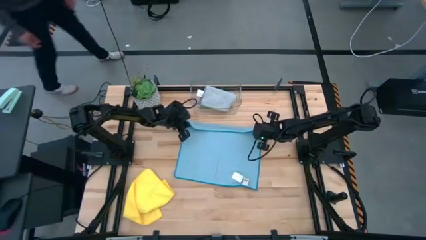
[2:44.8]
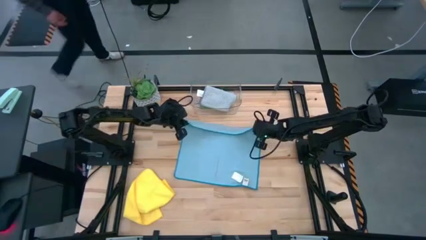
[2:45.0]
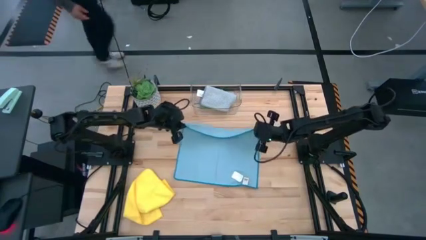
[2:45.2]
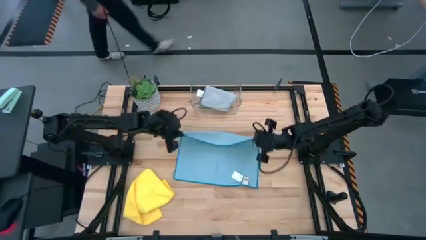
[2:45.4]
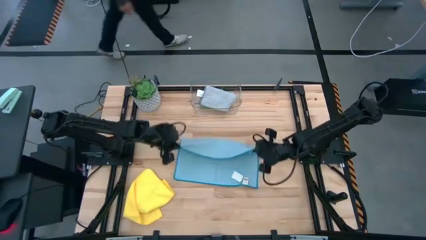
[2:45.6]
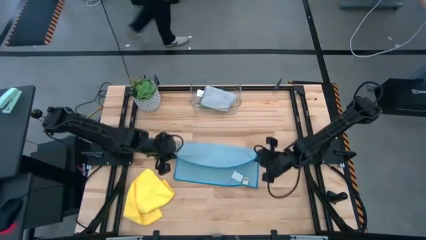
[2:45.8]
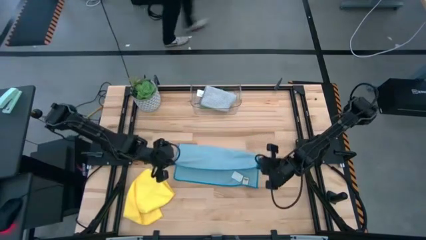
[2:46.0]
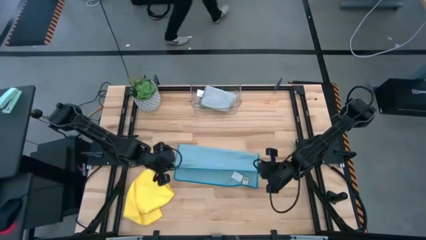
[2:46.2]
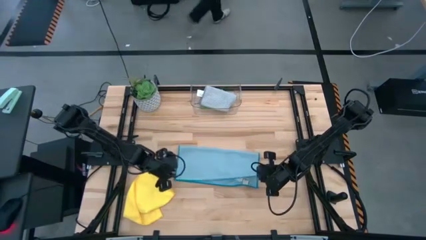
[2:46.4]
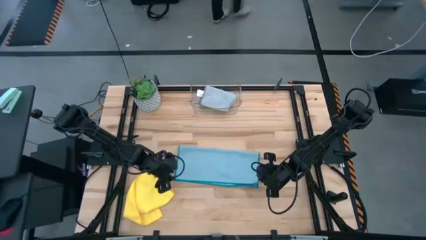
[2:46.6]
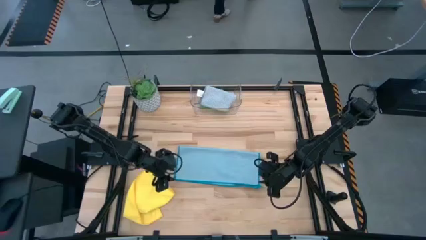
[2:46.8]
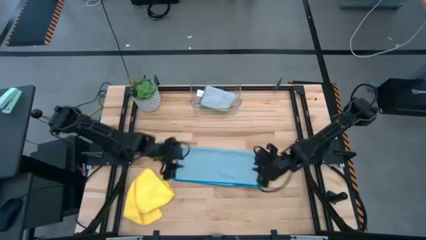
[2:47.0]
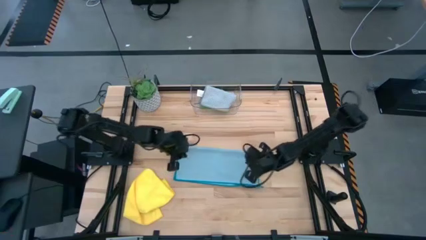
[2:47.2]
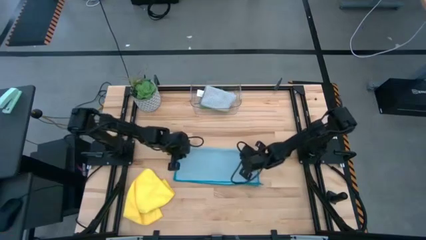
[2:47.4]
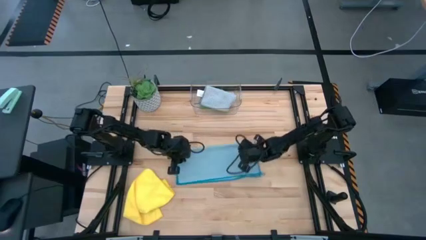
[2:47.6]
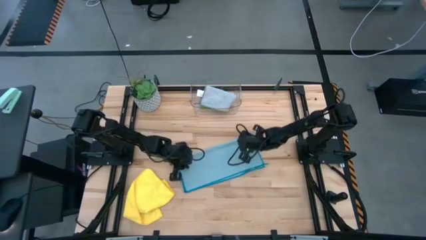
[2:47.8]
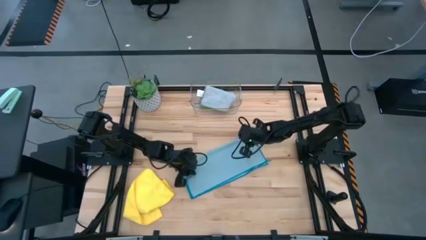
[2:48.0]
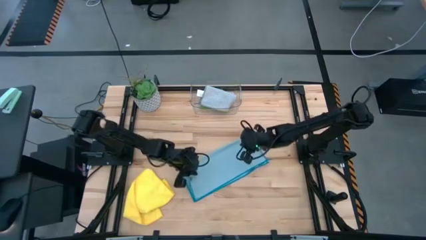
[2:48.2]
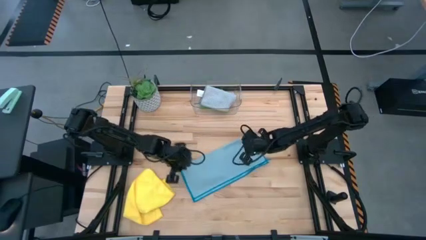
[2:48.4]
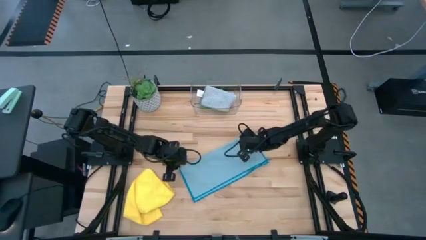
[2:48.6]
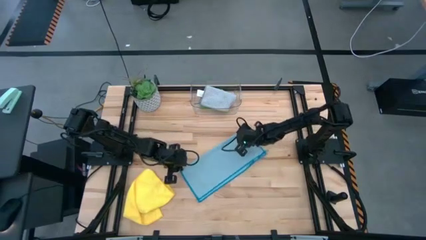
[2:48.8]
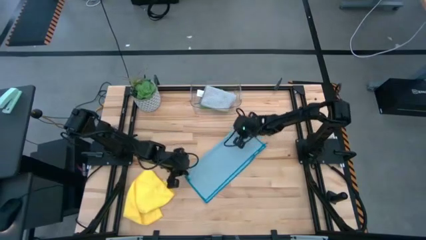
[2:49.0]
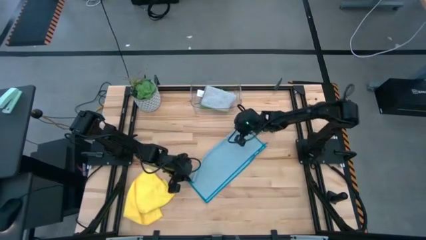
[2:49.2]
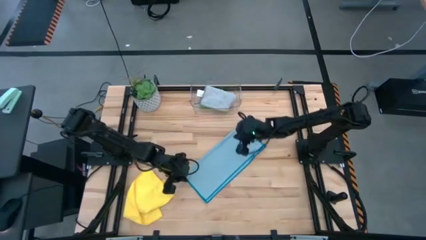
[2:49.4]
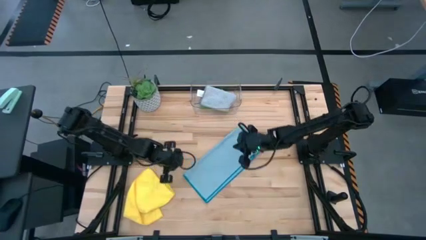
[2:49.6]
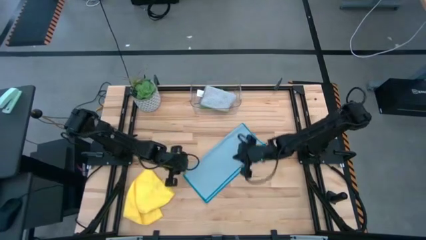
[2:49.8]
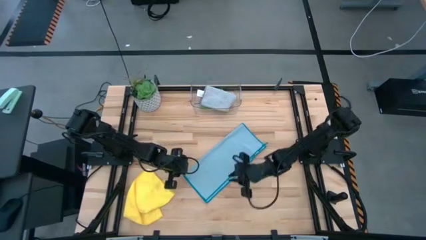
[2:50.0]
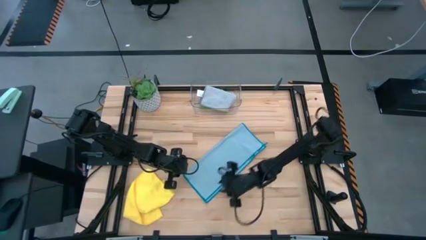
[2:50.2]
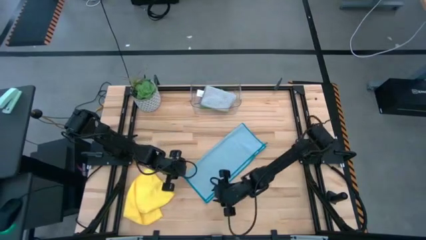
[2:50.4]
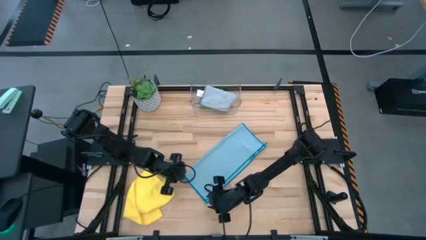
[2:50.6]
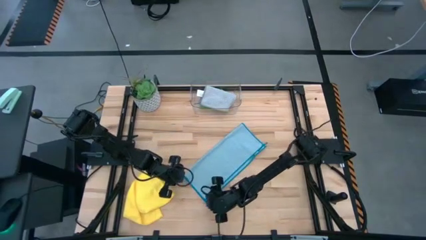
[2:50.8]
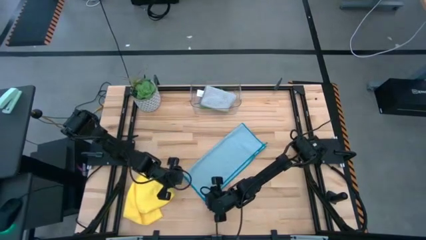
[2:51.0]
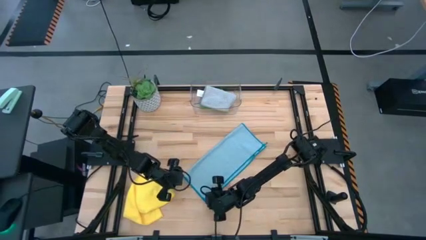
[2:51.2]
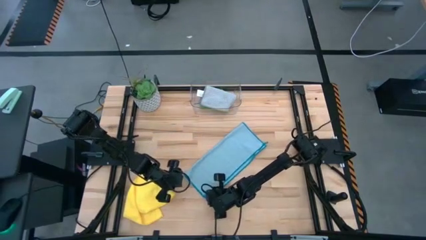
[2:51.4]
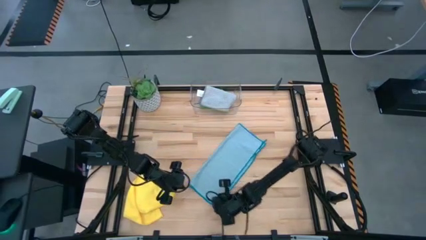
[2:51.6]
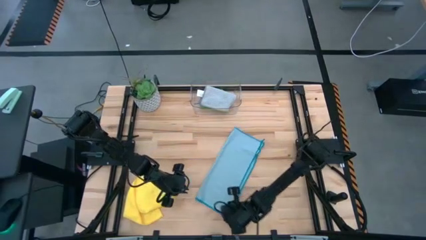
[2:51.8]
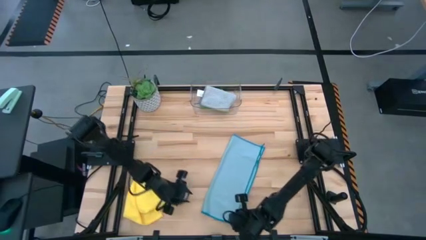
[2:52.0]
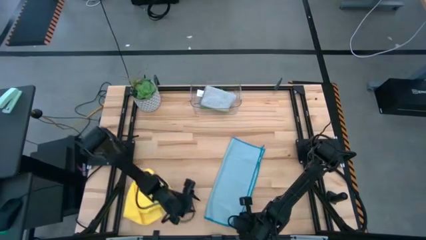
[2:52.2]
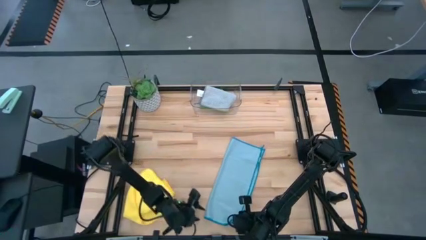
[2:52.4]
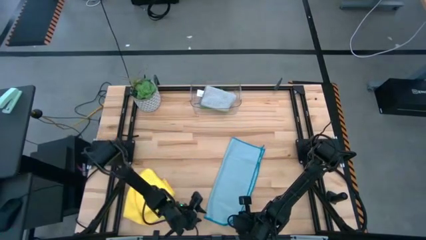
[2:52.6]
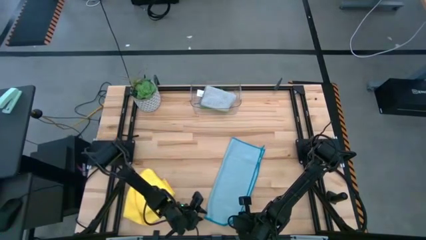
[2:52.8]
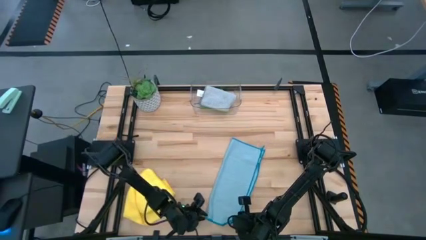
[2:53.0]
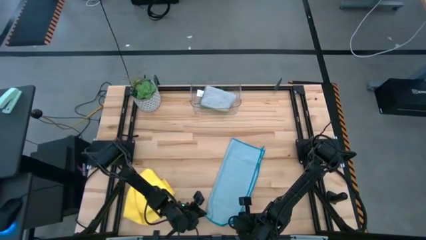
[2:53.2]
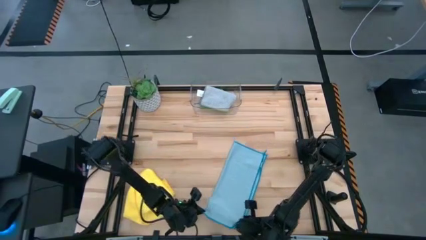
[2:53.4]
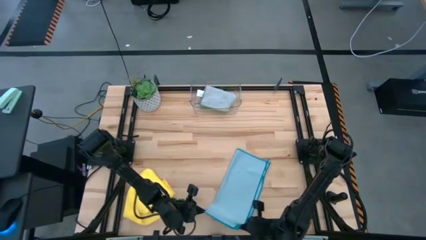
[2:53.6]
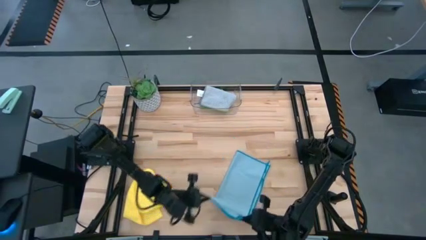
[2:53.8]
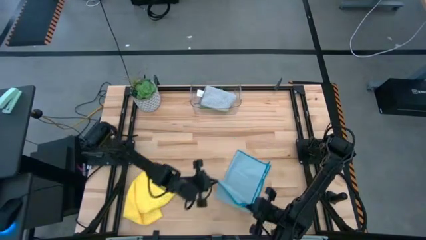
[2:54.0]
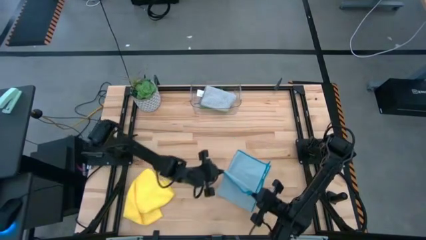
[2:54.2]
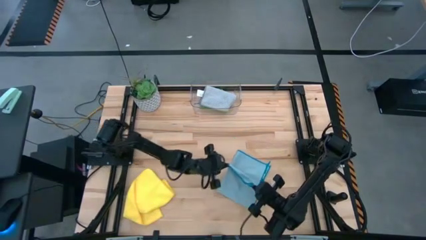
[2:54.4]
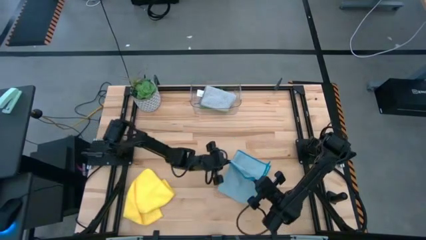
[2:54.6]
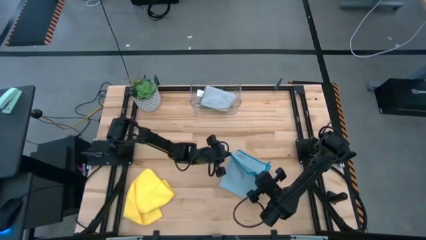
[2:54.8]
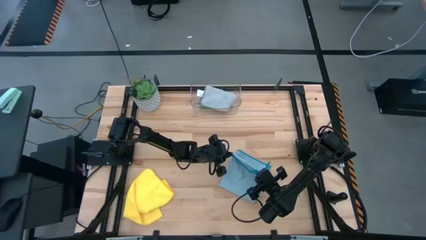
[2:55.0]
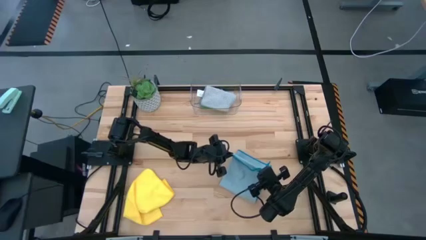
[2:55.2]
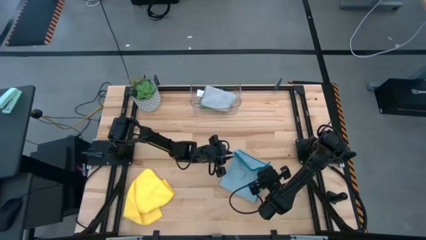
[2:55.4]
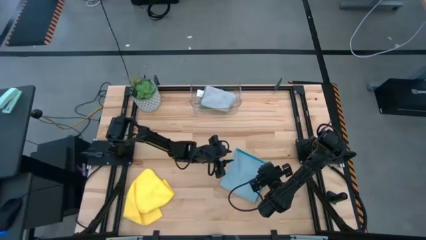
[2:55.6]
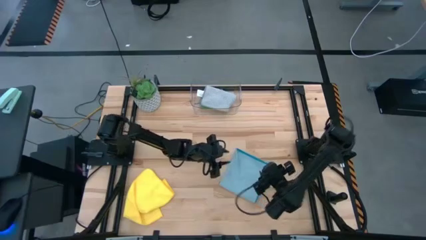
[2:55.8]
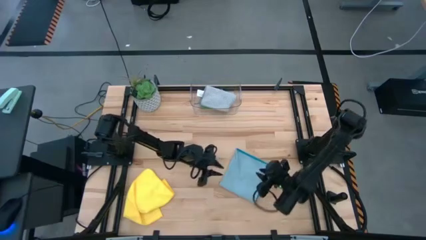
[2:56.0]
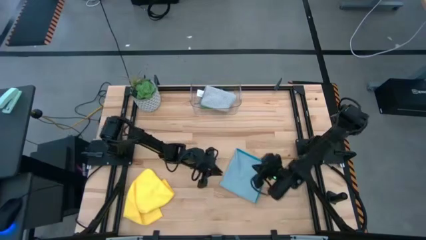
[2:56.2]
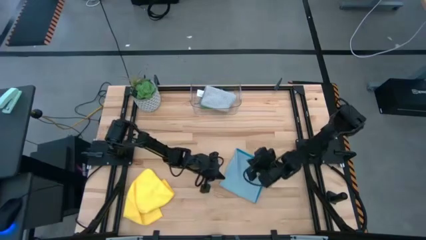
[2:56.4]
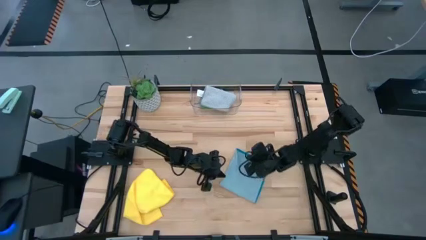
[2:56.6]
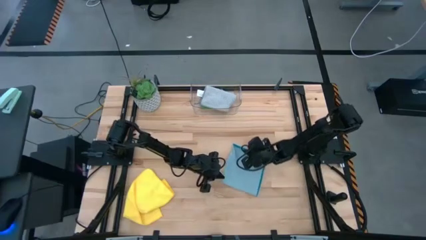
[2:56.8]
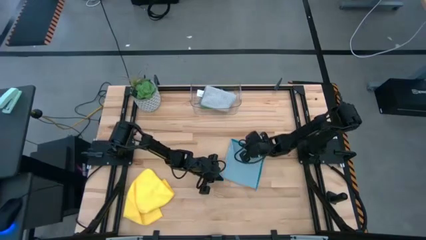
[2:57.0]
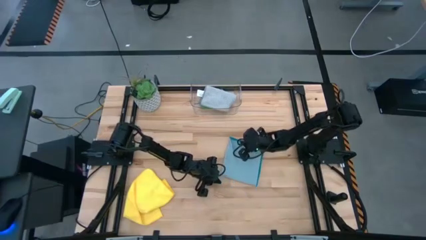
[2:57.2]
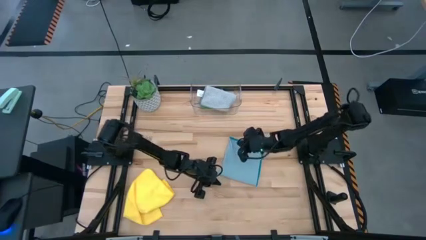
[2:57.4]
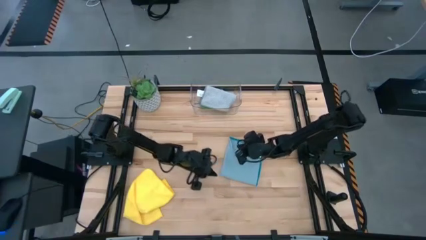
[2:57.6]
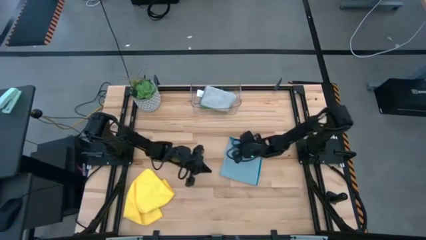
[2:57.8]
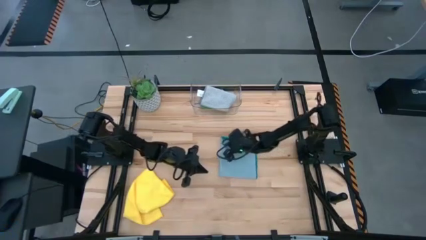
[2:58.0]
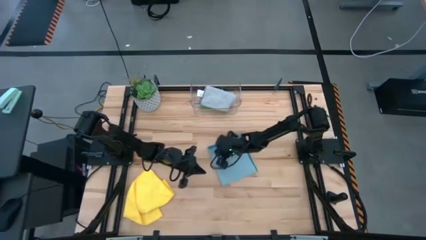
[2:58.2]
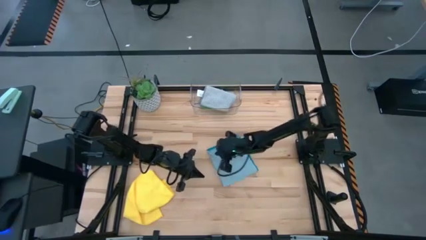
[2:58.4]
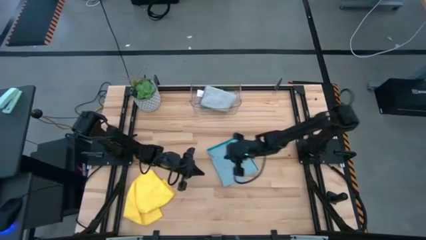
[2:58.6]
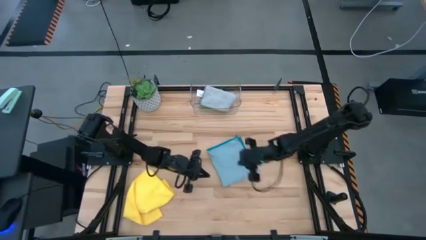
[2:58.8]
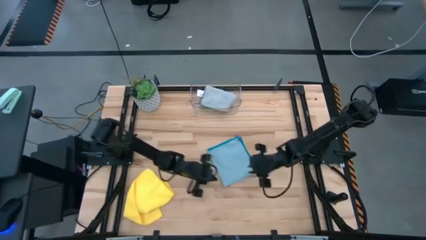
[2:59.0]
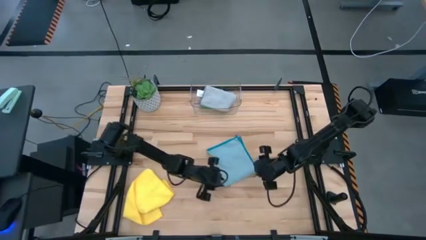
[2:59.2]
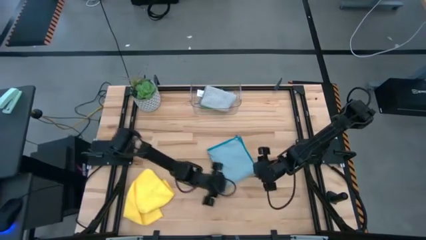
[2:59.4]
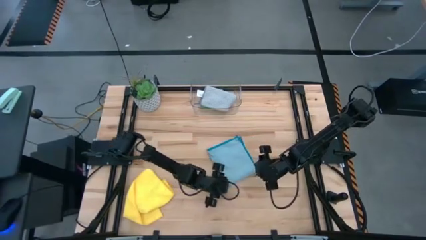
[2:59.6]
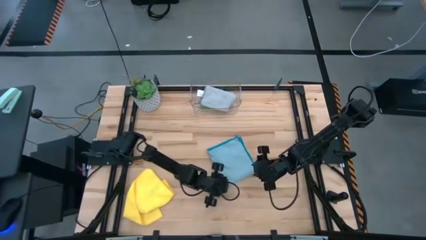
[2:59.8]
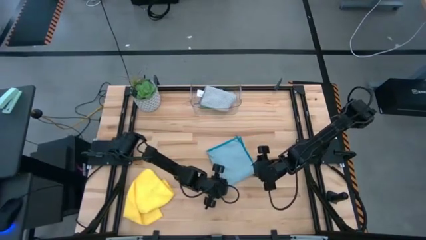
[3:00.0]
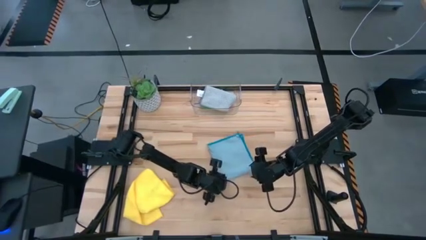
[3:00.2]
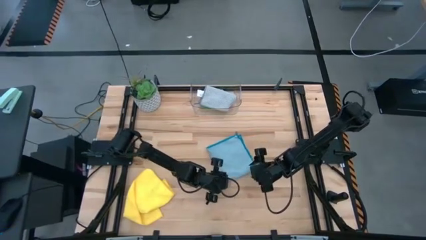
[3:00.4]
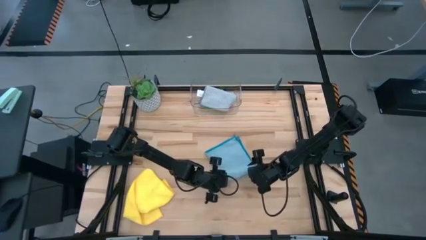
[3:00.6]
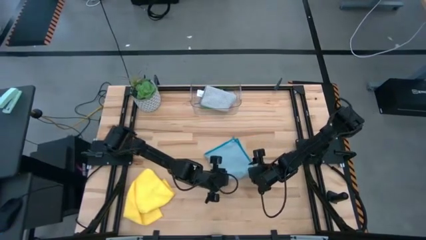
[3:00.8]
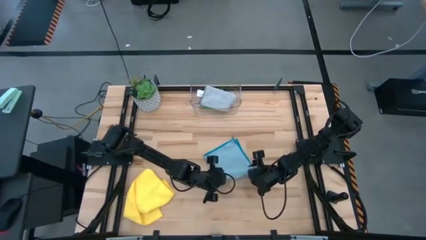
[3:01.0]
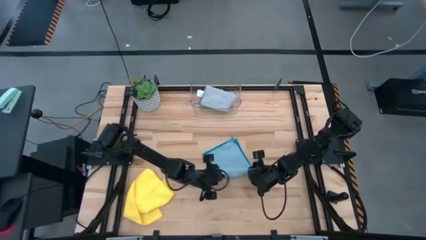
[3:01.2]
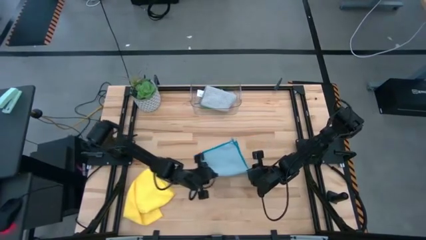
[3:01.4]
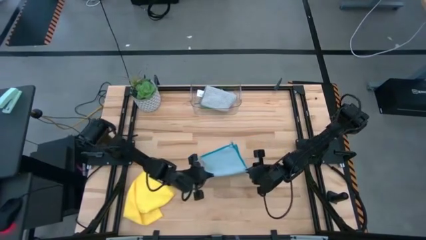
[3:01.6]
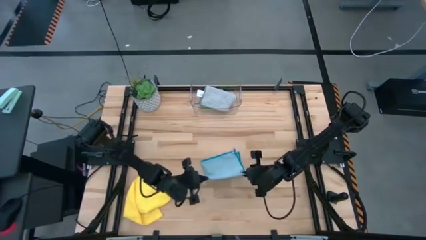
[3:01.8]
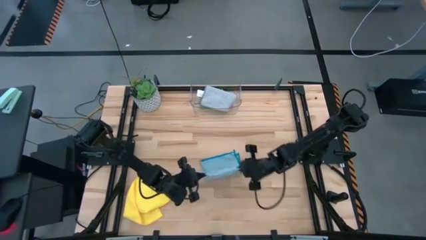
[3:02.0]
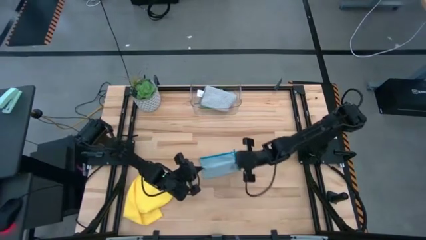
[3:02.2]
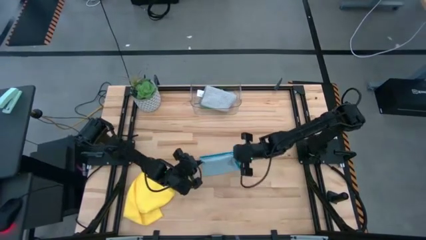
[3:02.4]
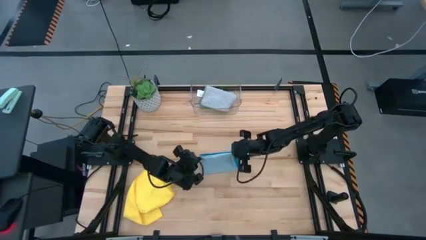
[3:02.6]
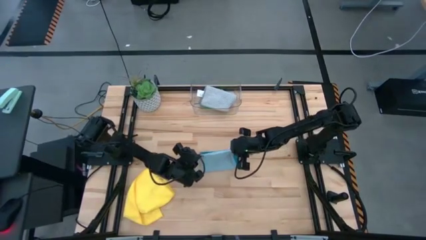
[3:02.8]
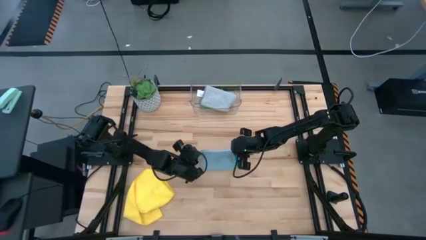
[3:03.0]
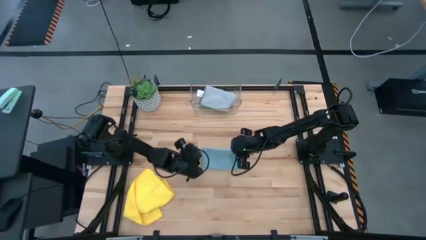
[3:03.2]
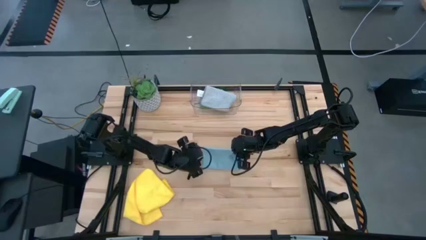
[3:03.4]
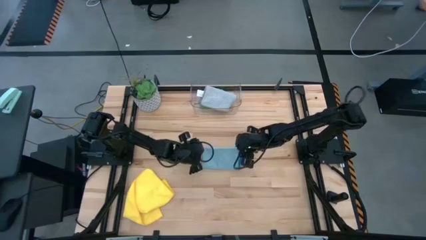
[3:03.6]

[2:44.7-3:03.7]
Task: Fold microfiber towels
Fold the blue microfiber cloth
